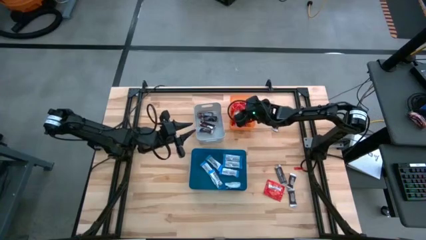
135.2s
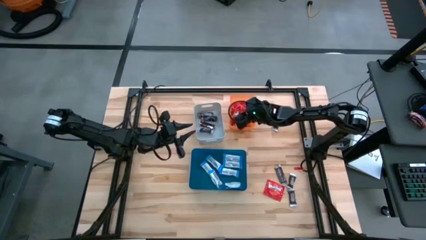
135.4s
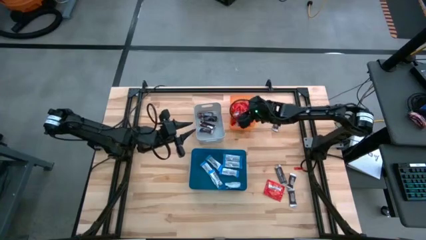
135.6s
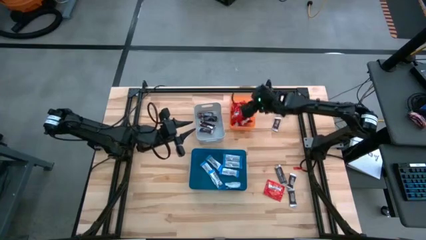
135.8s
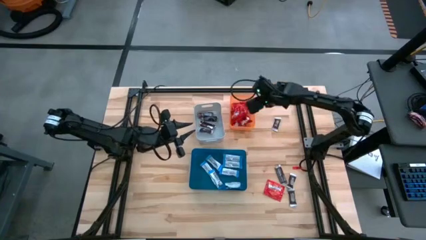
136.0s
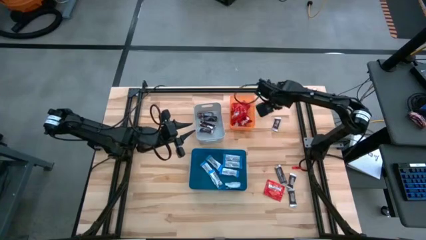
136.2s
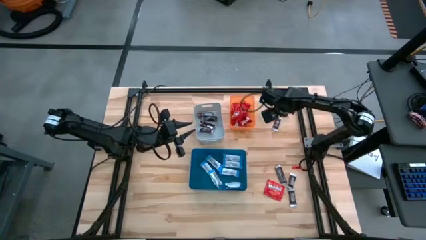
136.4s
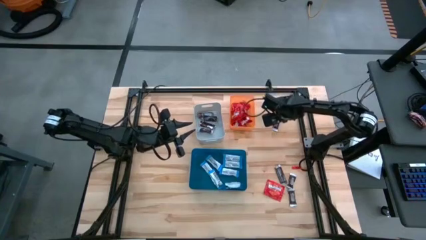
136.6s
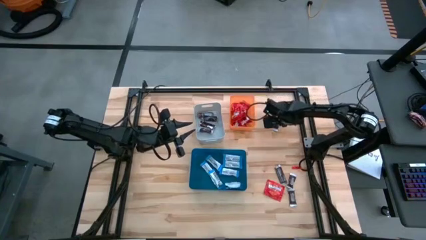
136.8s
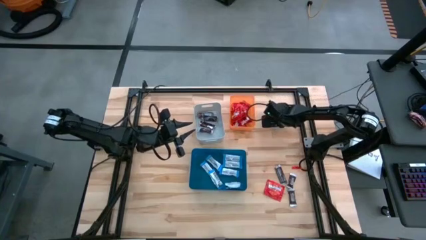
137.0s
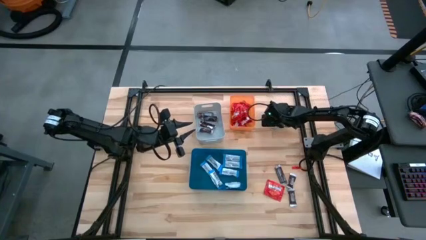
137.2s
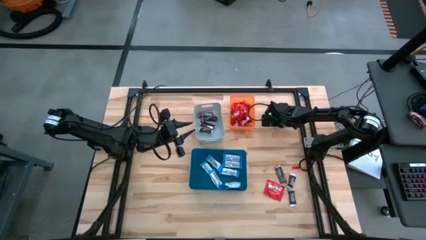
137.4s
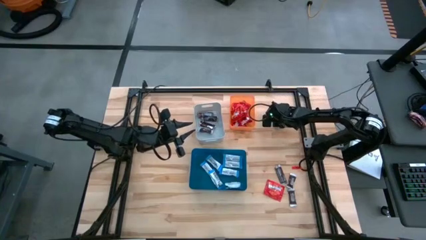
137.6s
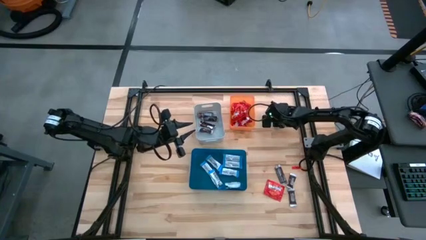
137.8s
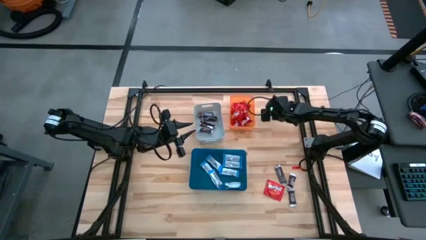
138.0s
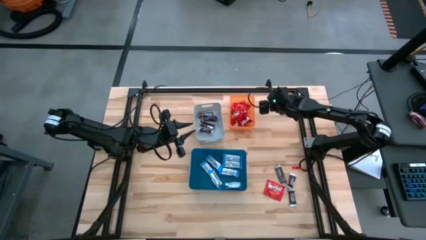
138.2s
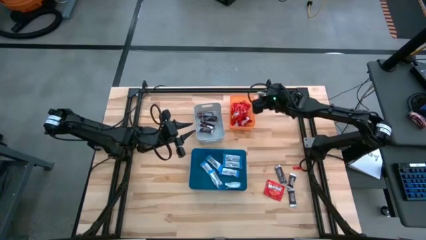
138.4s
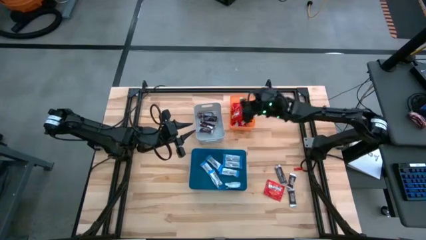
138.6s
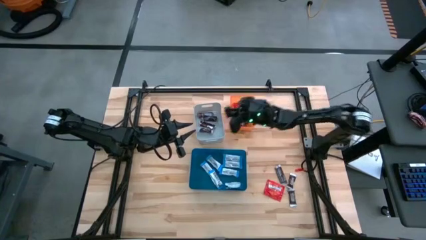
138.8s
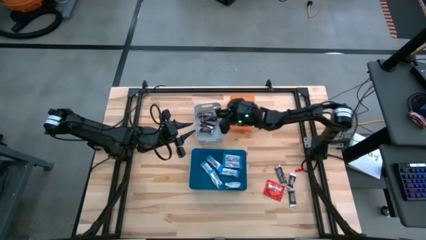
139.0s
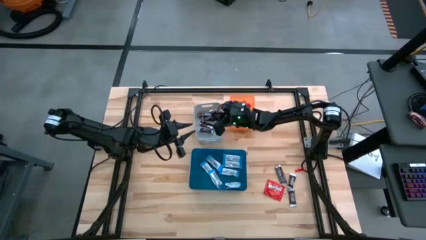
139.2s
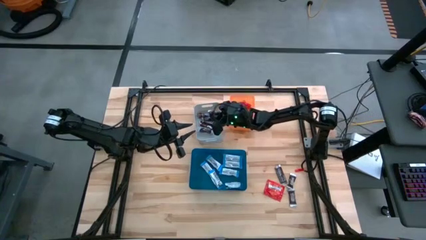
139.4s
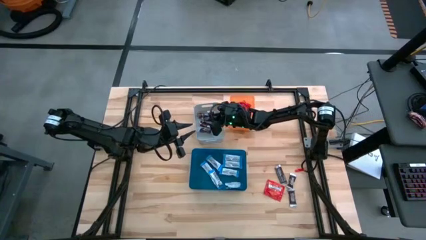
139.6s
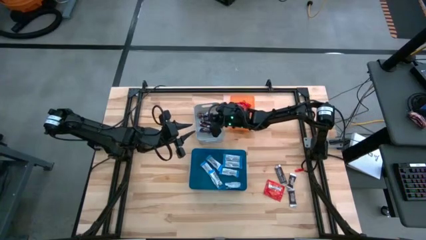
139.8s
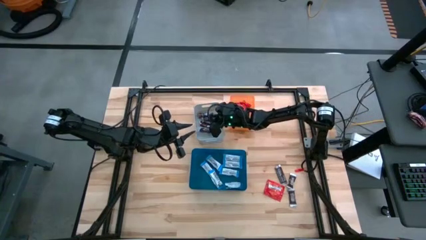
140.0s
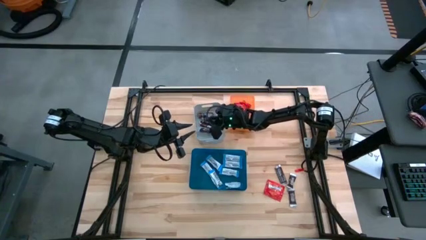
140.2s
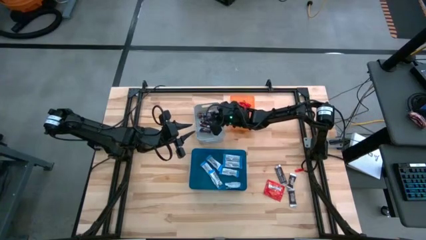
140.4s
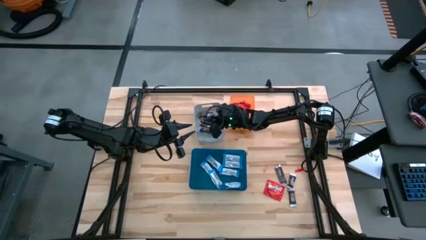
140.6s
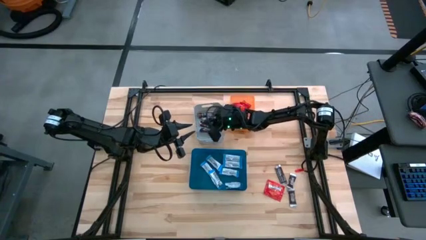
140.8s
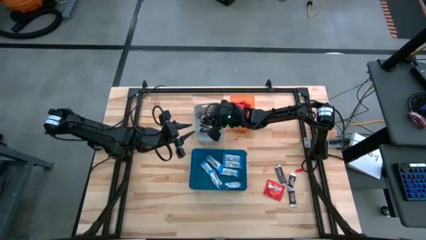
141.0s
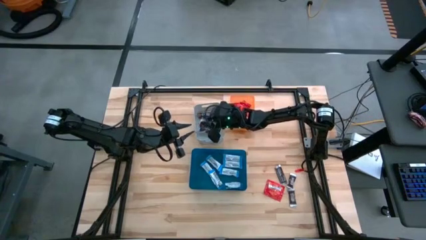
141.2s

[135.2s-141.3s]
Task: Sort candy
Put the brown chocolate bar into the gray bin

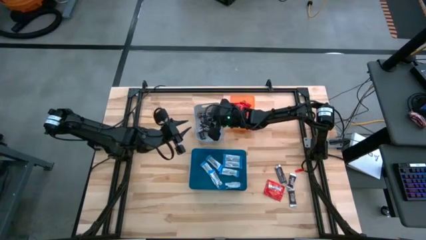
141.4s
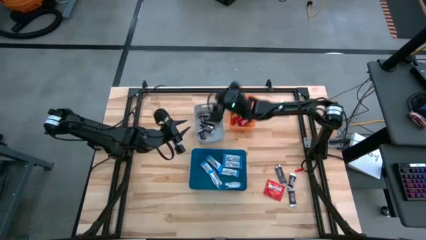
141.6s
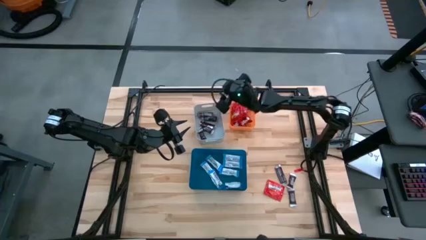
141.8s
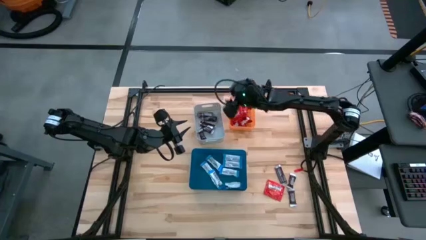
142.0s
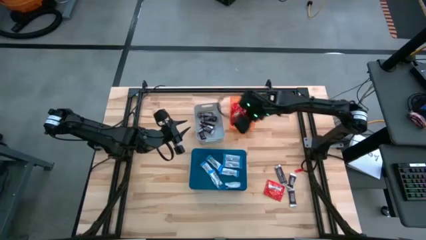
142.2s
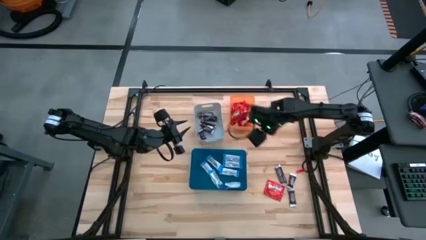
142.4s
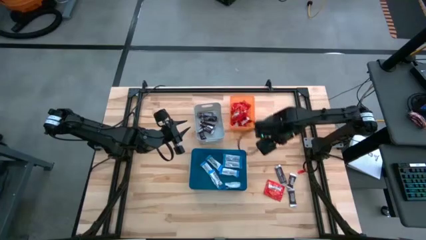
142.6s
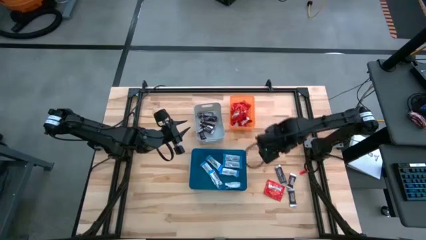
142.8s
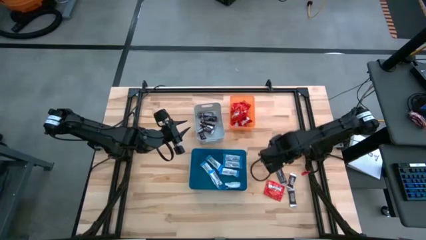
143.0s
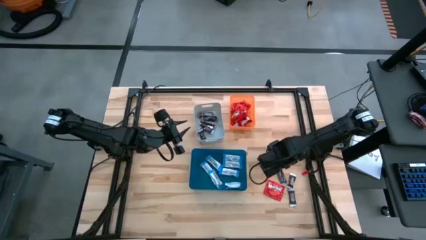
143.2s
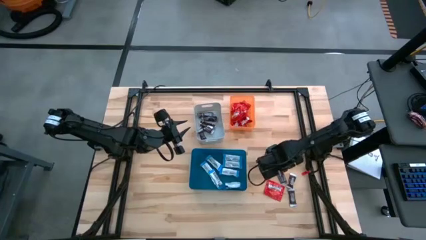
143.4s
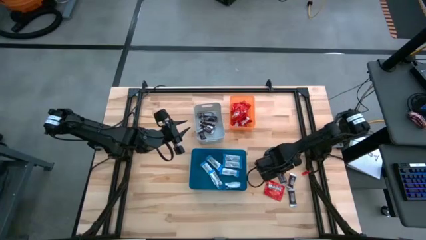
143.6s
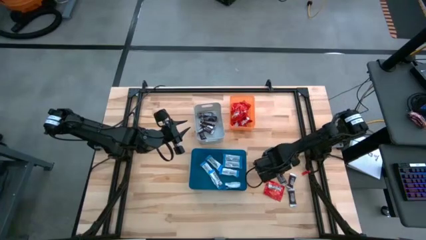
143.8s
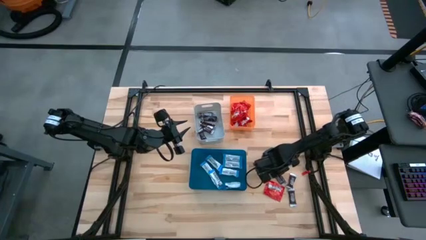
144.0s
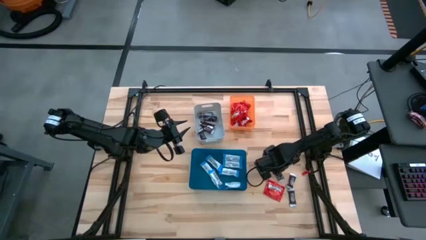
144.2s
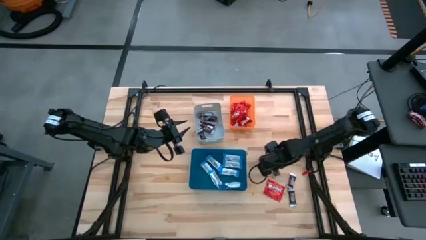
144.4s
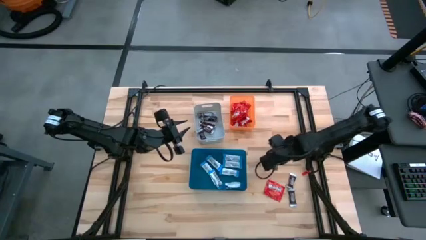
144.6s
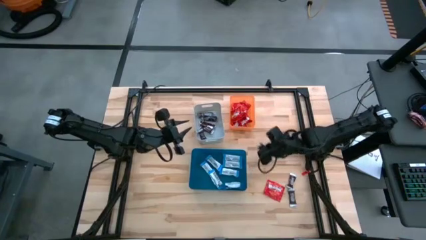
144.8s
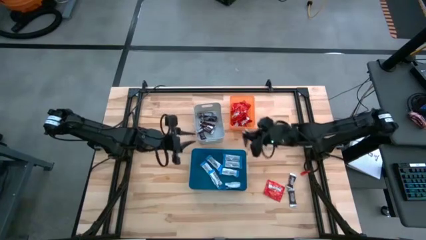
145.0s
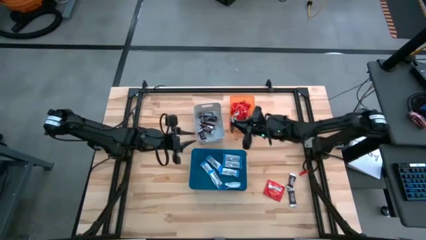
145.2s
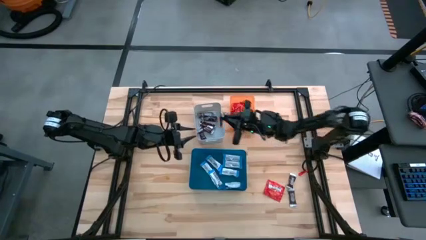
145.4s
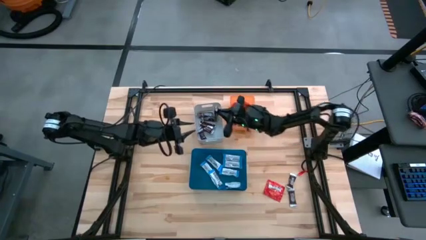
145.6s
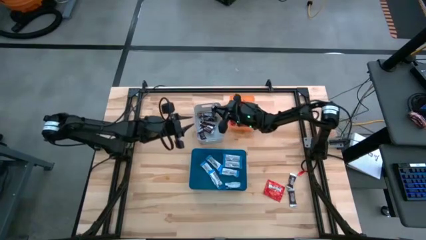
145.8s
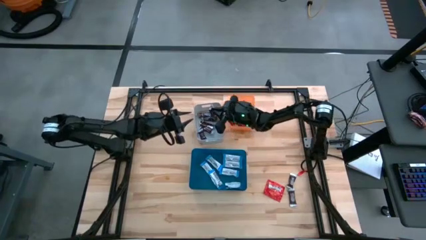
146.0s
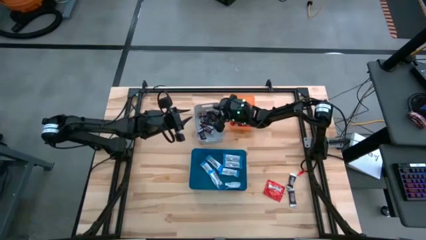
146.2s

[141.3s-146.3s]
Put the brown chocolate bar into the gray bin

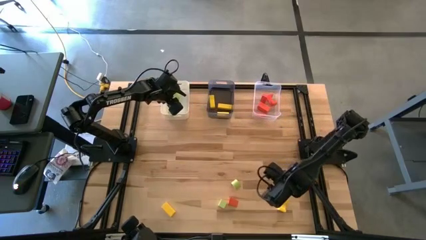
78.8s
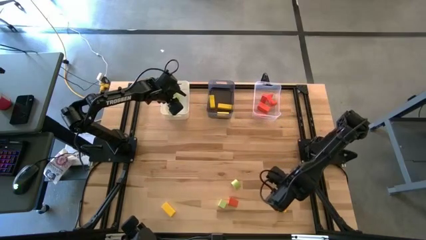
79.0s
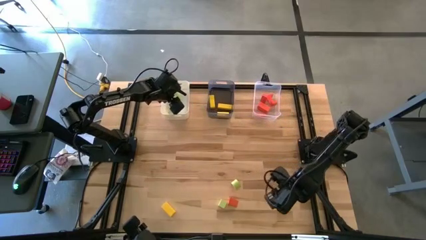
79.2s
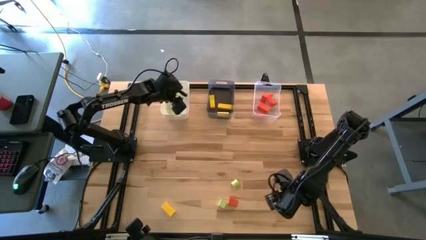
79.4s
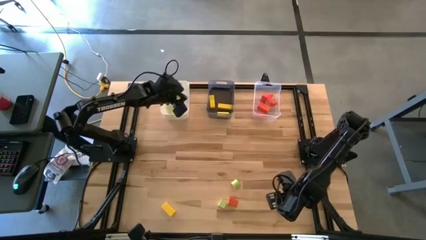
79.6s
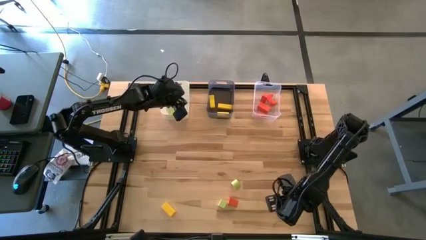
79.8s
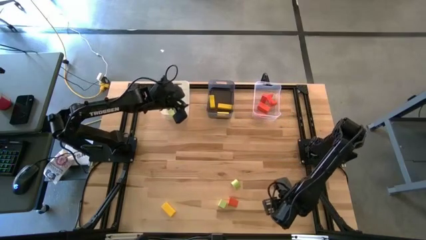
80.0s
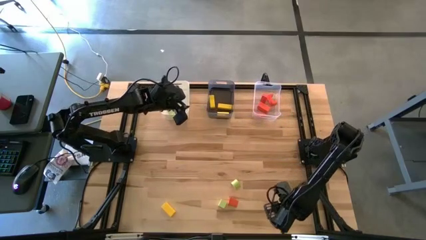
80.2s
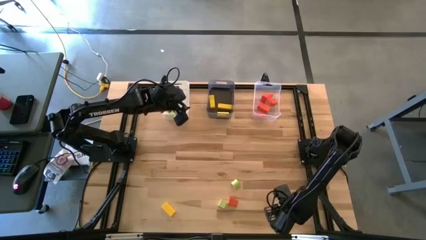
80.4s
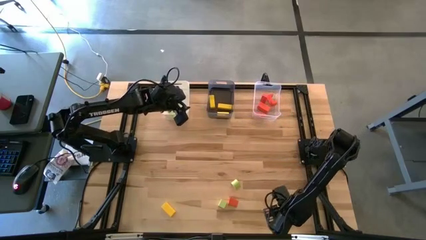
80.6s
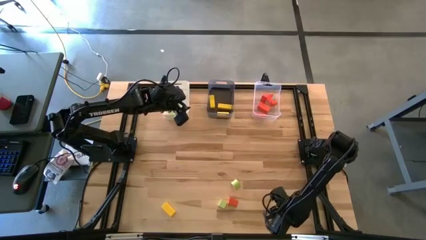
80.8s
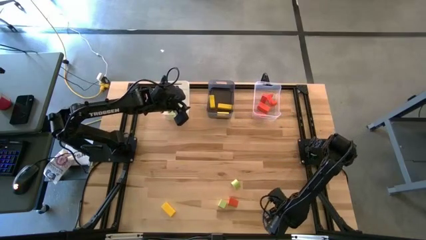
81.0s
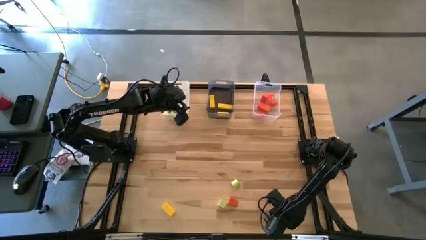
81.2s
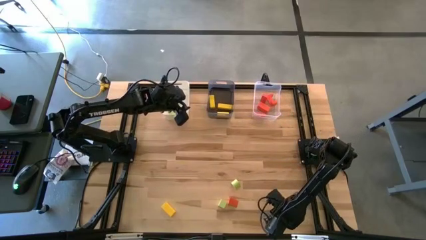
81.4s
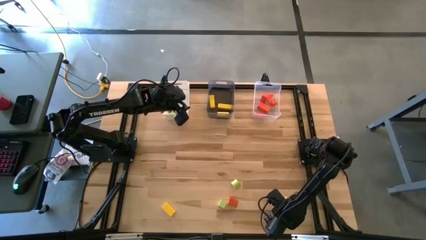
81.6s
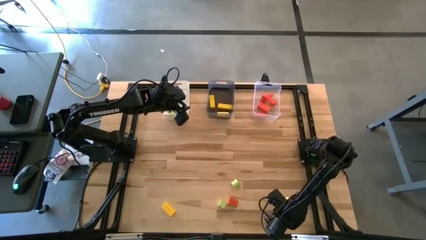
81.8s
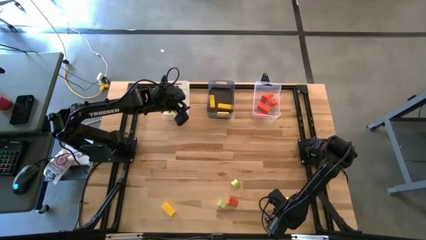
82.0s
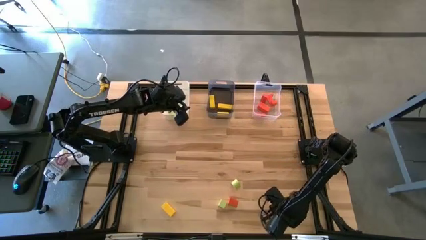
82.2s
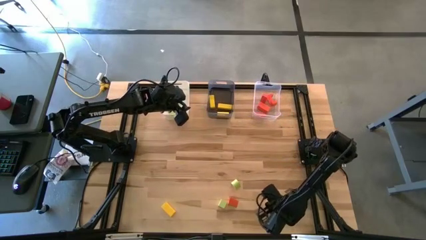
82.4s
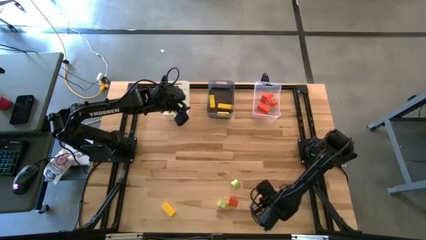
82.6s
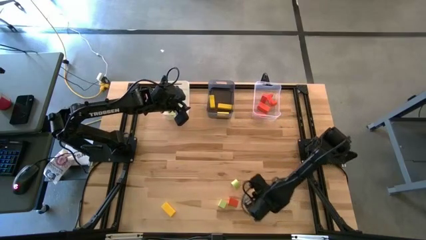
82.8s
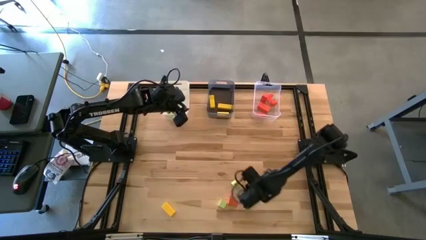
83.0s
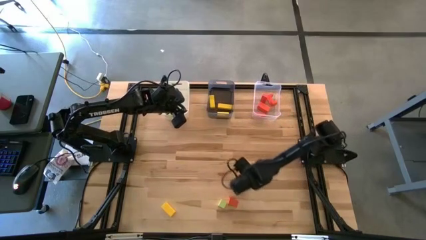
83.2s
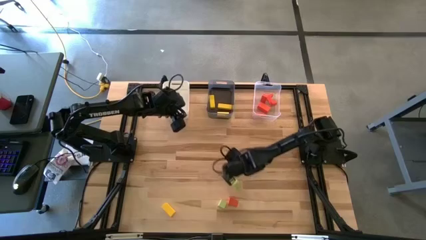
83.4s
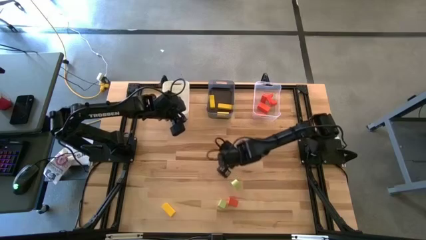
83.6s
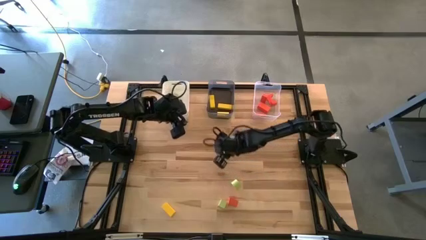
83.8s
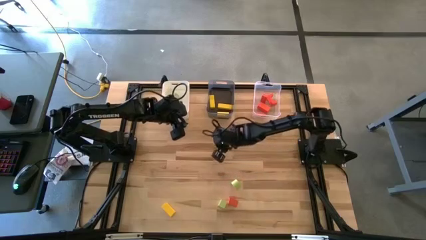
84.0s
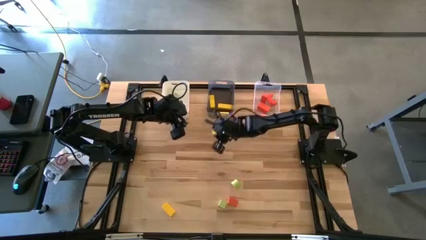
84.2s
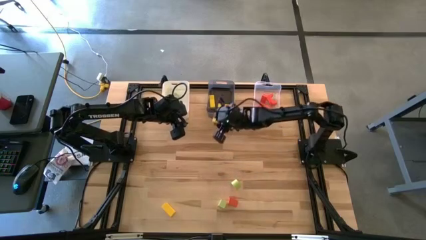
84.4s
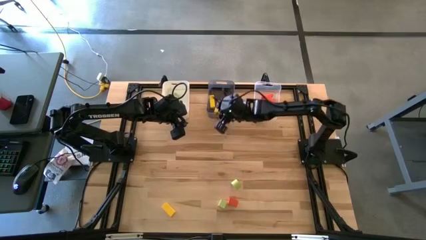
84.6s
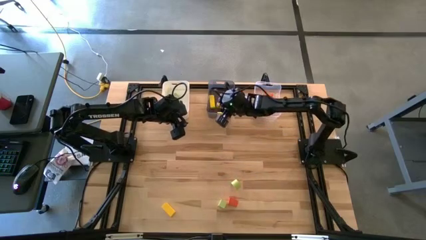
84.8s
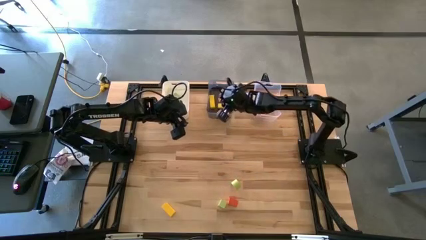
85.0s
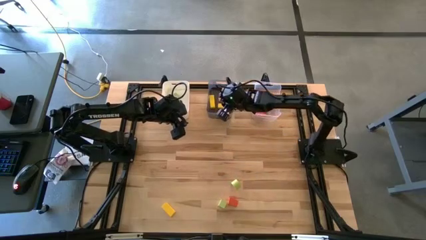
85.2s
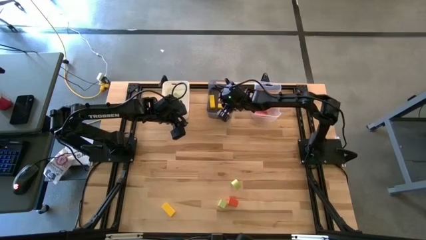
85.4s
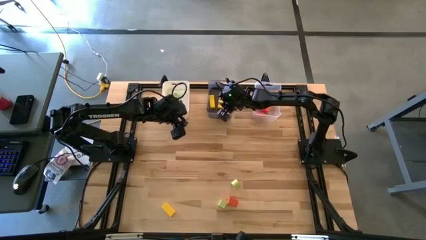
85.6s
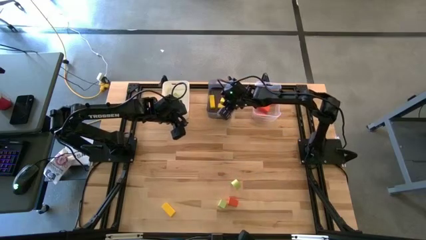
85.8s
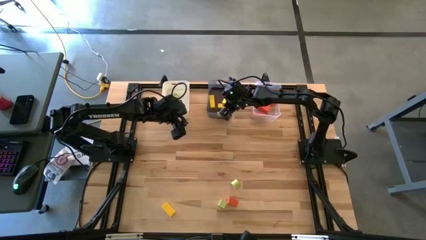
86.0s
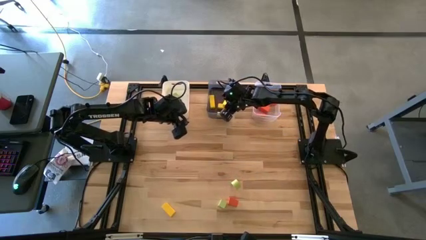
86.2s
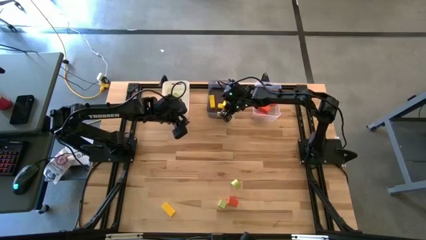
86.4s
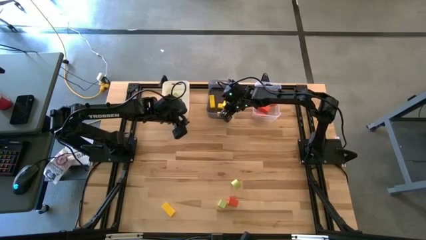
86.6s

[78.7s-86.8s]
Task: Sort & place blocks by color
Put the yellow block into the black bin
